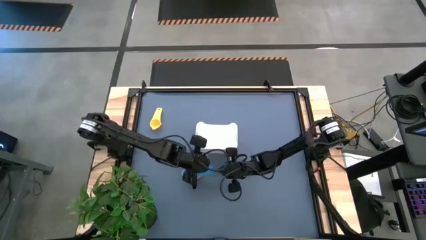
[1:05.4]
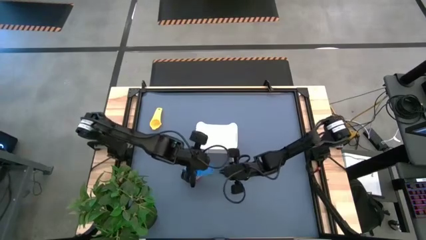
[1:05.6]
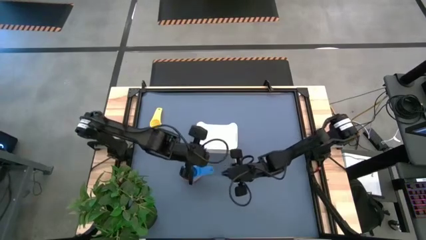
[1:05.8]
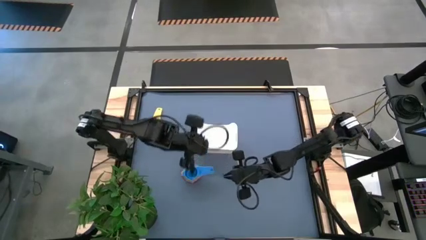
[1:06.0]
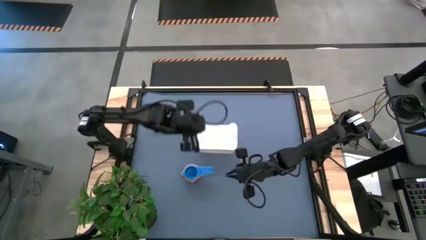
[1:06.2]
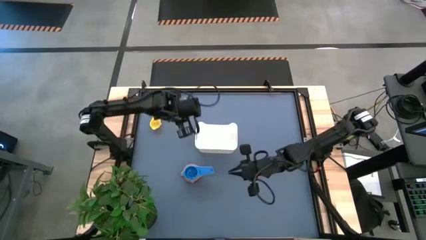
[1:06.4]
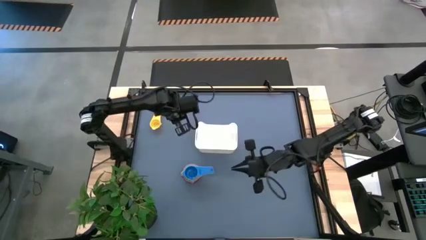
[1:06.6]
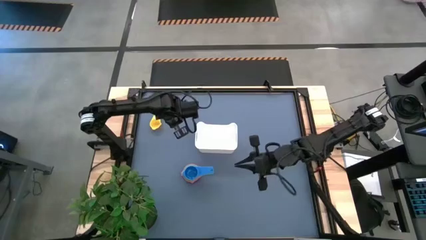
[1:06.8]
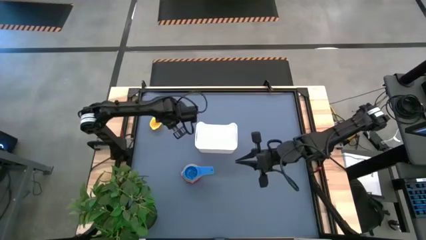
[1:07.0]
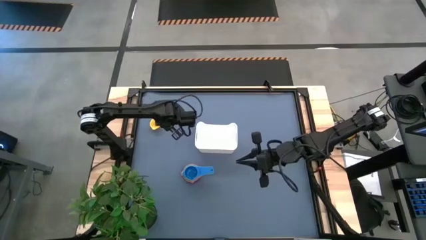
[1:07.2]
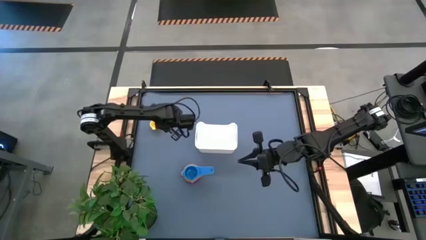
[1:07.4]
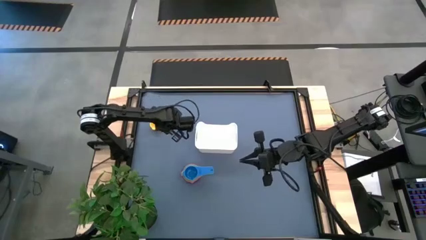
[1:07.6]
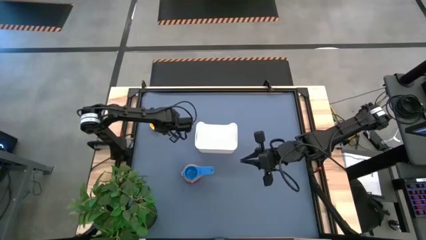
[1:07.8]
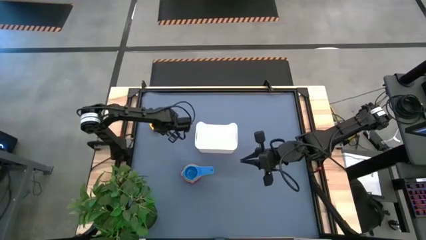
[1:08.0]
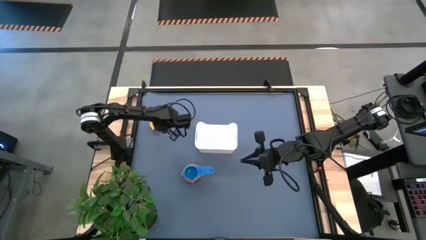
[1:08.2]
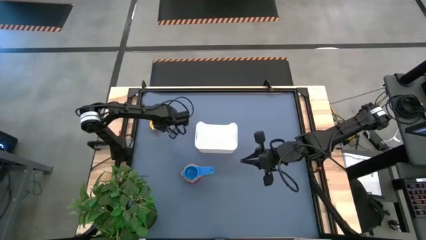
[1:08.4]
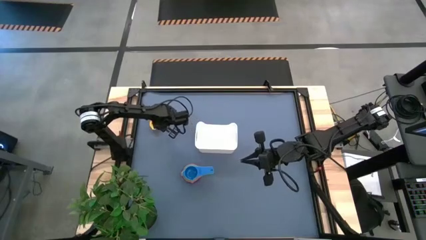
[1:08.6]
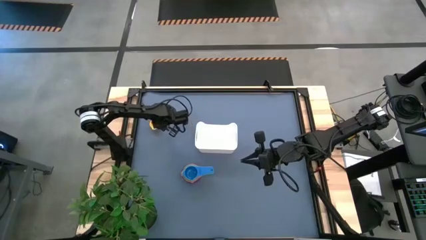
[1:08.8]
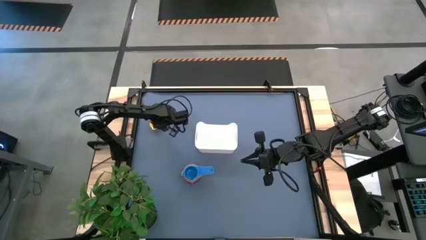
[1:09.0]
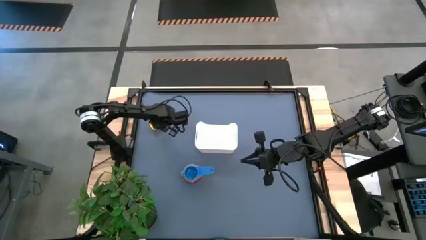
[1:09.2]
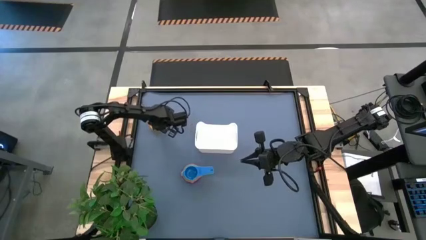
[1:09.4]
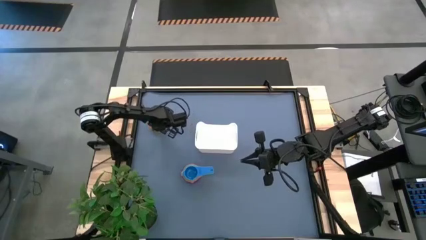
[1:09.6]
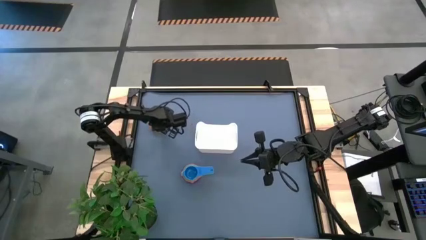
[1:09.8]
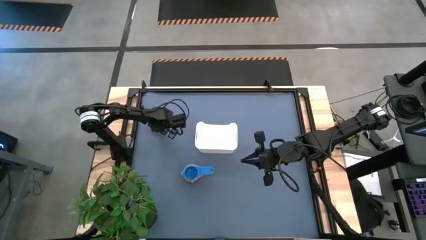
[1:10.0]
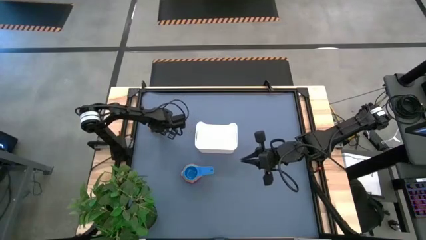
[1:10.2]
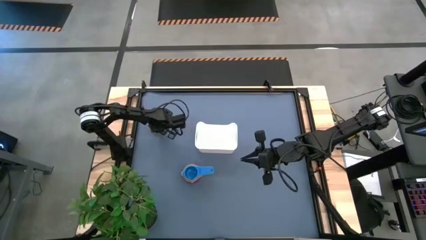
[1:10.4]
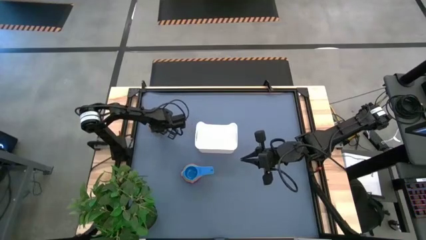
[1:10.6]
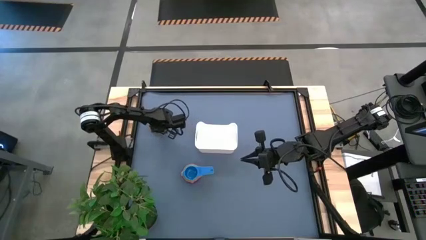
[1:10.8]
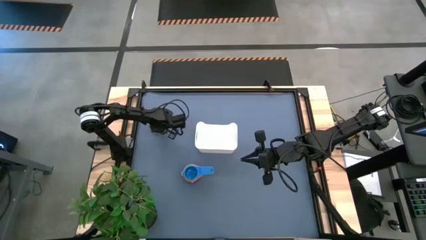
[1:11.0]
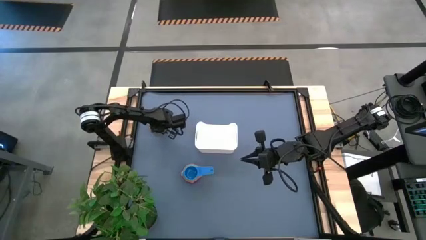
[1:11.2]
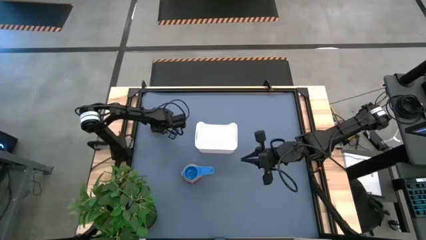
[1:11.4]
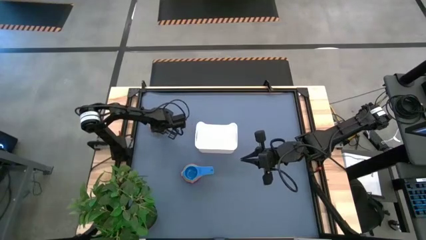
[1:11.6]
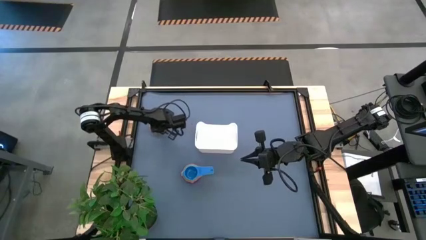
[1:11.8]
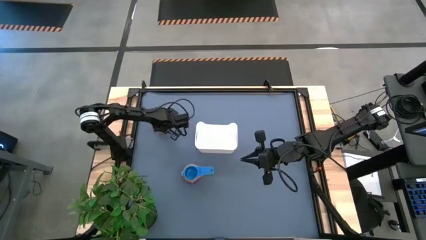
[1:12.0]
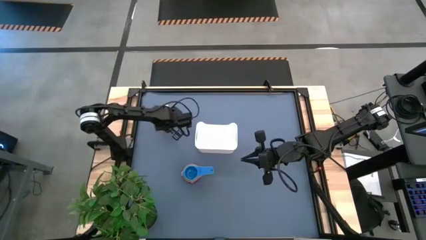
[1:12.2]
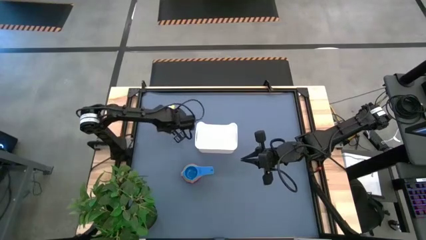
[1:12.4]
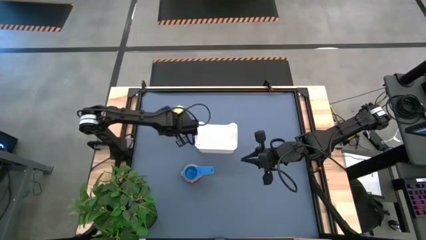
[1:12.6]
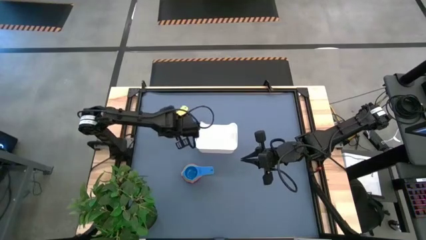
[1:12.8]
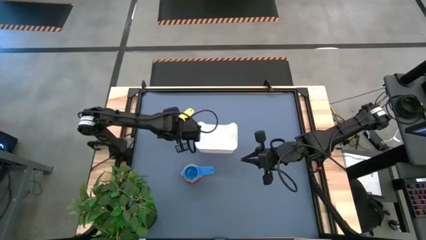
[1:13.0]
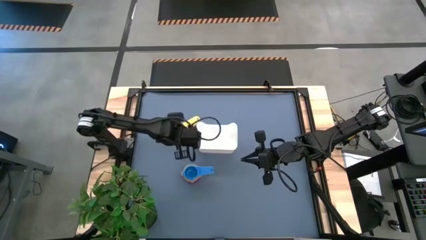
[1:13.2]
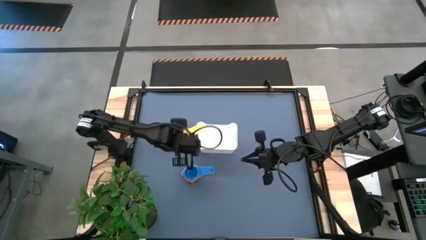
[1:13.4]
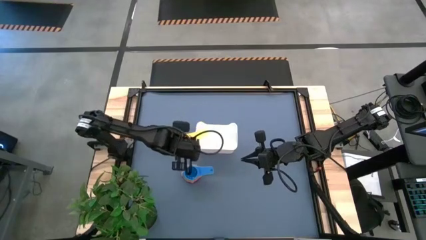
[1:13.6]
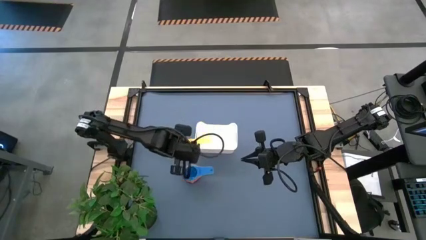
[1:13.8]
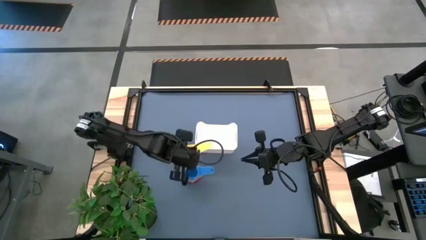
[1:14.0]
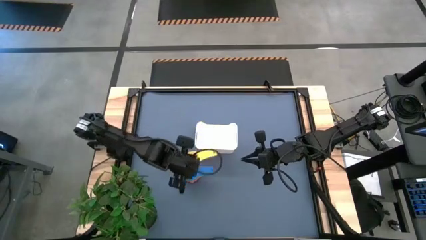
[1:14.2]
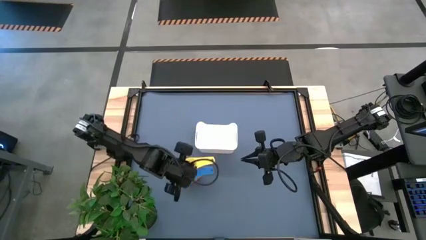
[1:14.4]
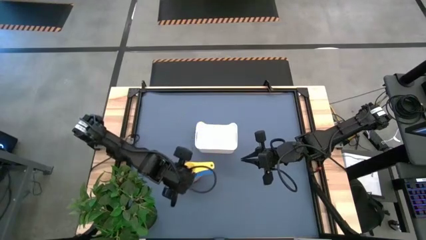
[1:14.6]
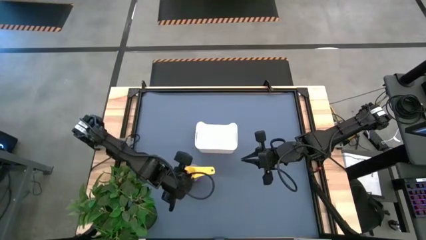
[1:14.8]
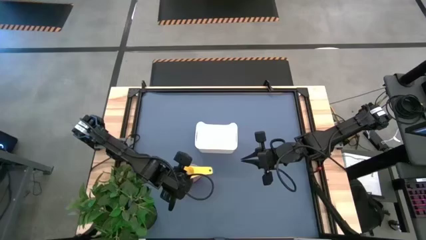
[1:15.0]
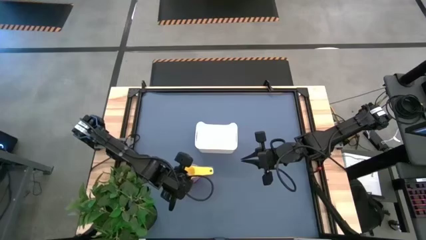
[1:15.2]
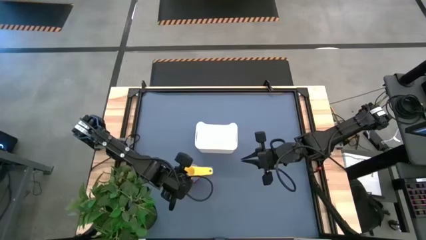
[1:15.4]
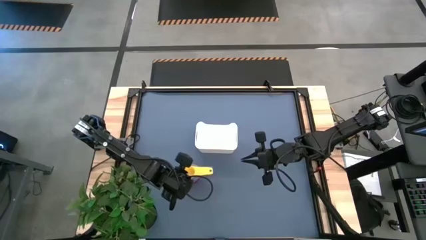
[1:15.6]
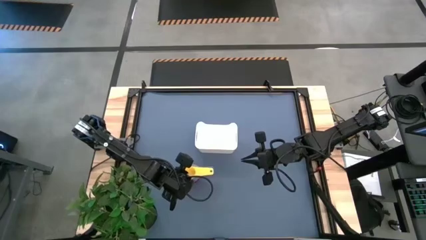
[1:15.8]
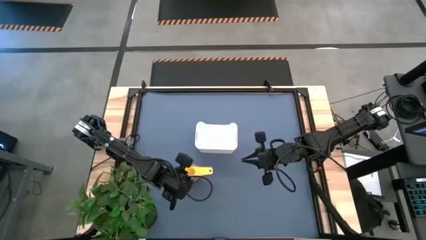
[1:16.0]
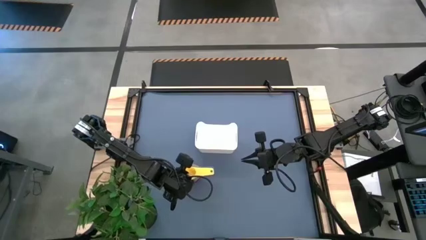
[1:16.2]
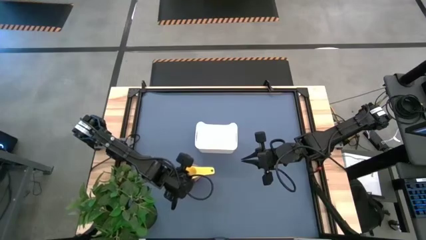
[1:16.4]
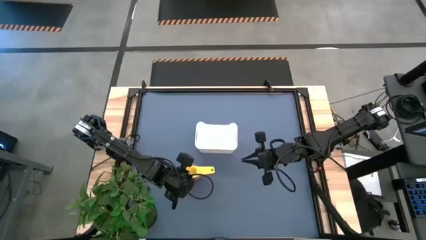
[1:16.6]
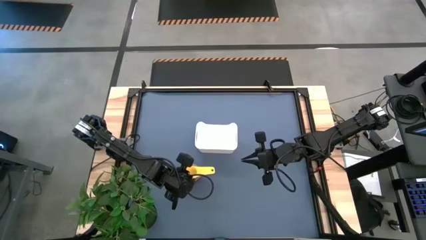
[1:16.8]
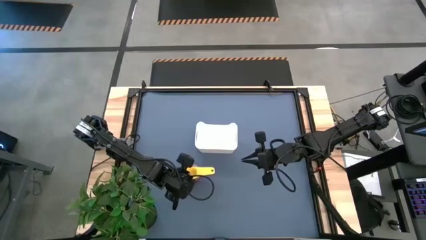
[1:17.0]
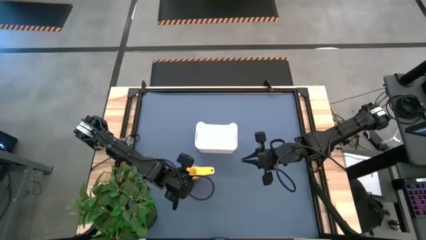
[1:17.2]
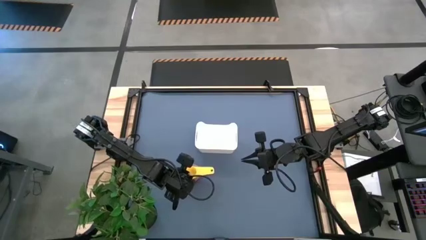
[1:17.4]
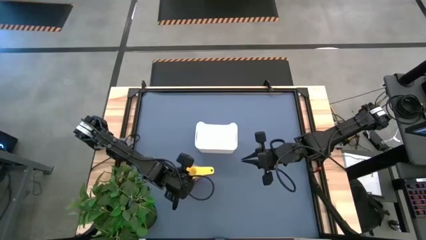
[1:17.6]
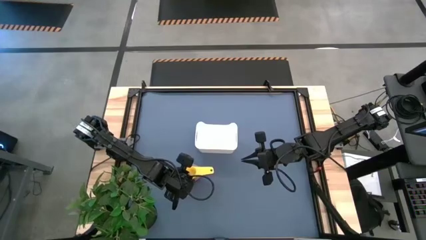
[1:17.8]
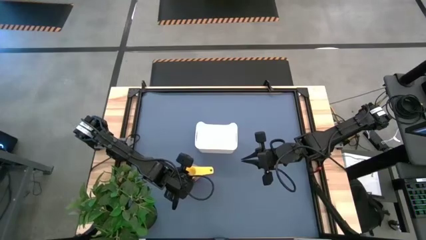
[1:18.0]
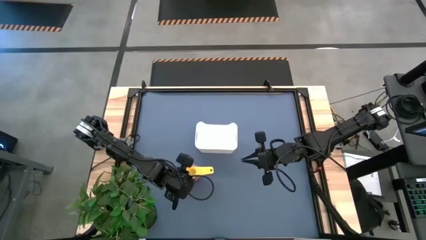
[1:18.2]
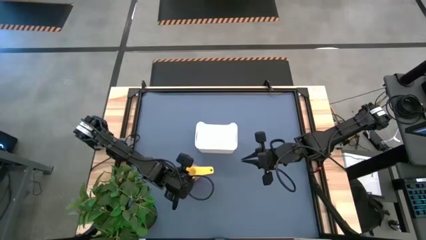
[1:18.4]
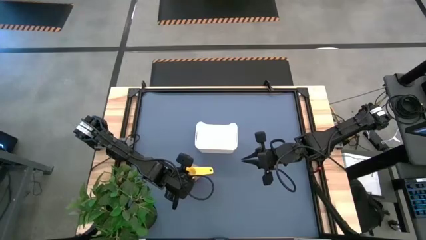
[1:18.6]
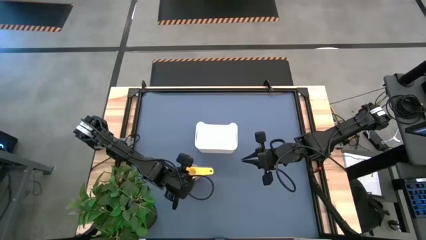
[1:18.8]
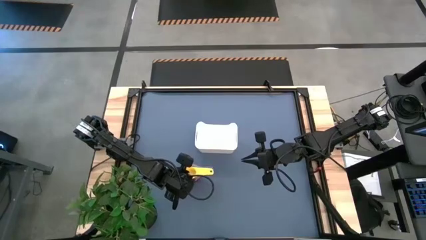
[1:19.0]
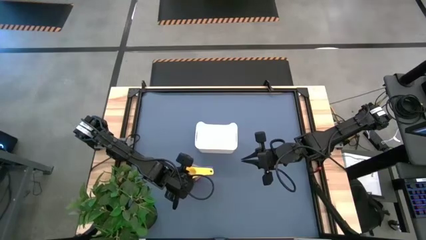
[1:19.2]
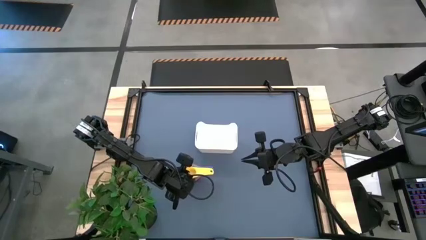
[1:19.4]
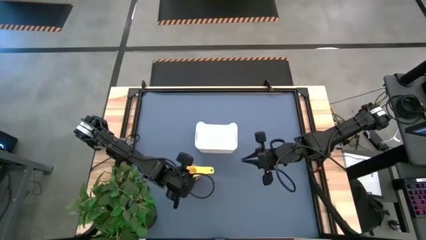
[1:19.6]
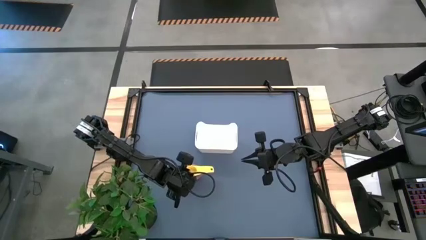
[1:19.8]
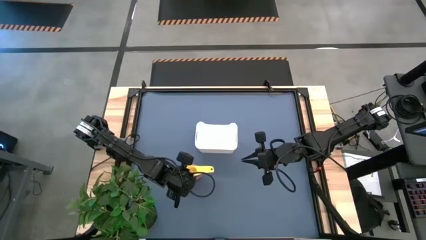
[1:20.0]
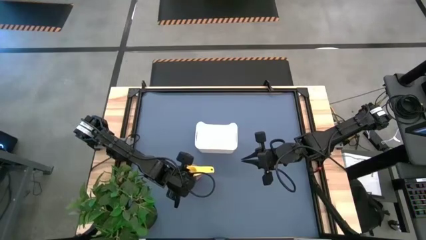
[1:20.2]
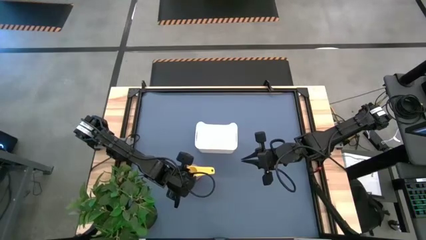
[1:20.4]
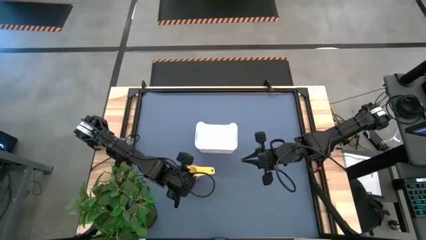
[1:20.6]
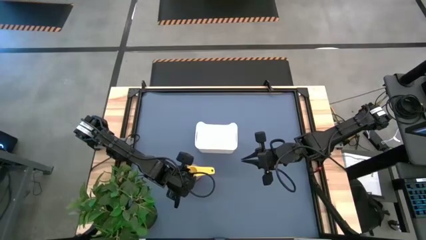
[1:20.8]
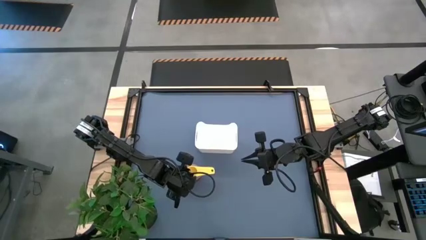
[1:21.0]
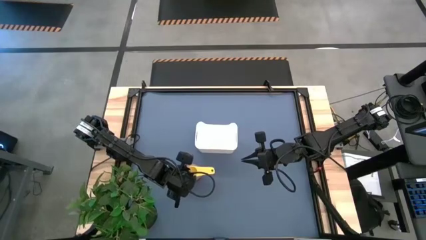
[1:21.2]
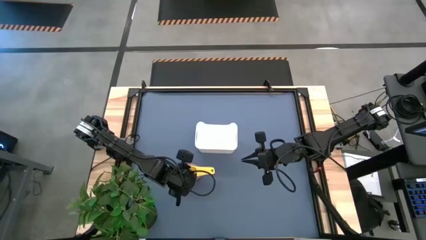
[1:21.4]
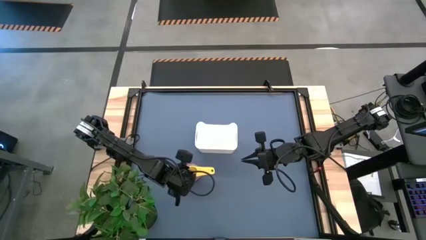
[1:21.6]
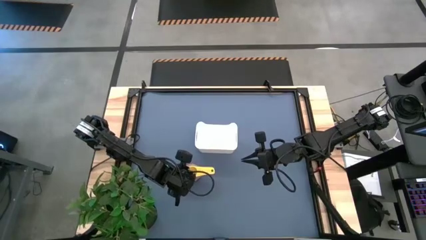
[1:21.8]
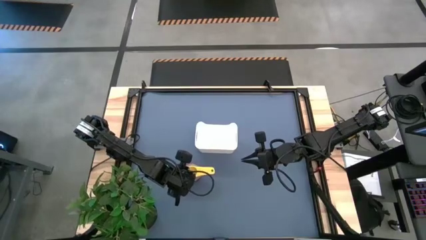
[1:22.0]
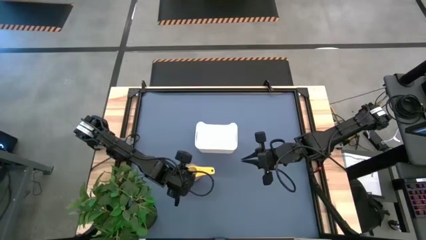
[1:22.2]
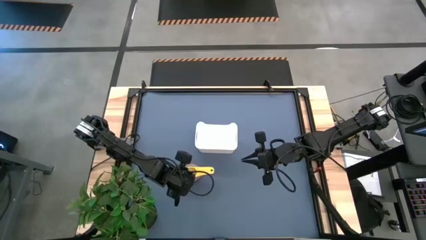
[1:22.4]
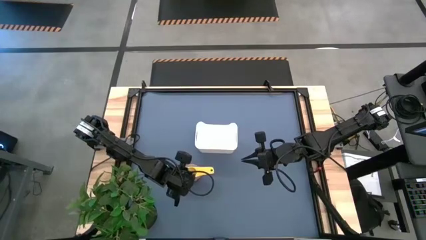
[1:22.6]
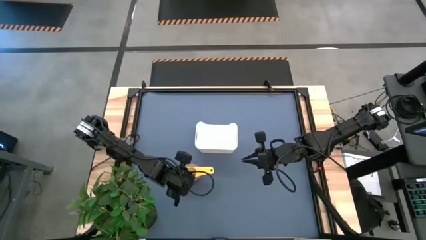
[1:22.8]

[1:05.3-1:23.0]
Task: Nest measuring cups in basket
Stack the yellow measuring cup on the dark blue measuring cup
